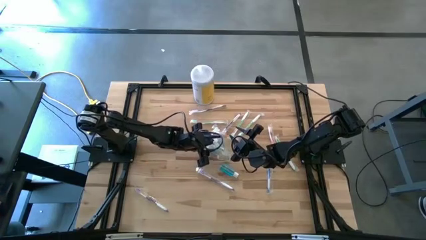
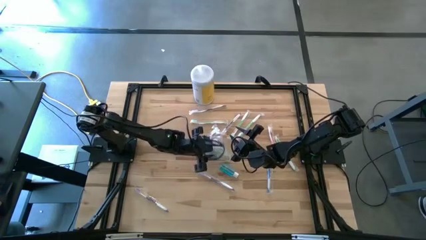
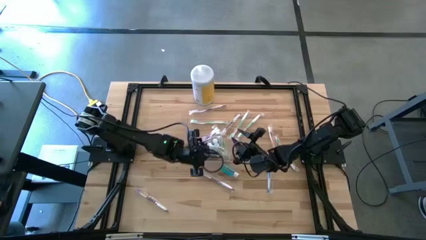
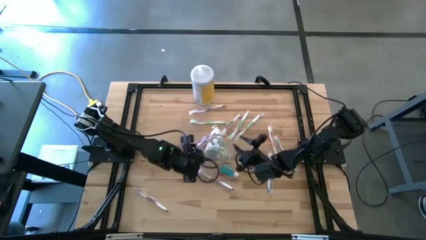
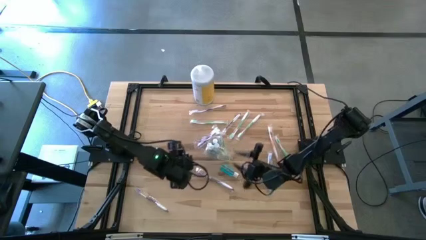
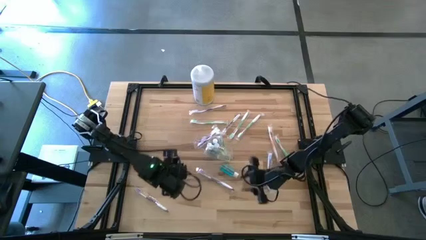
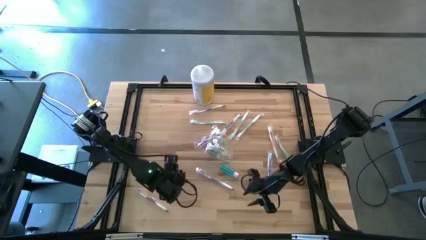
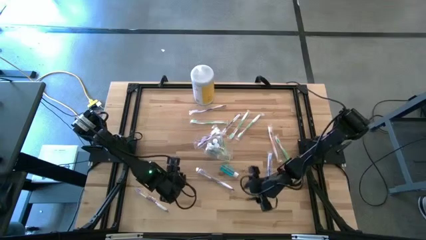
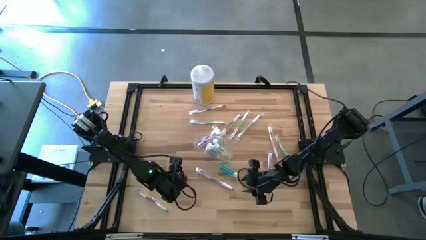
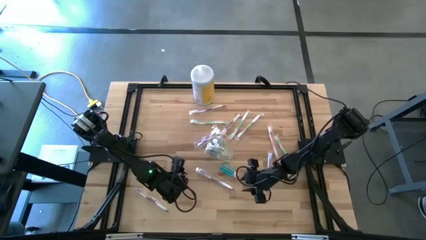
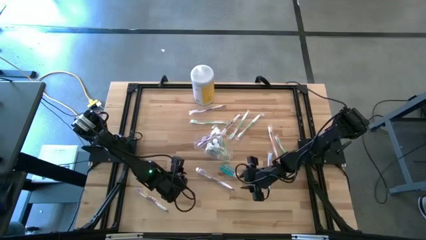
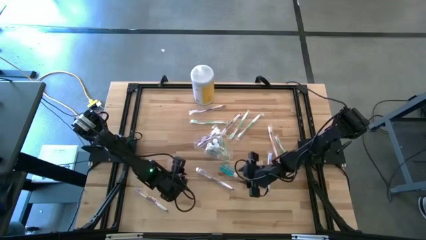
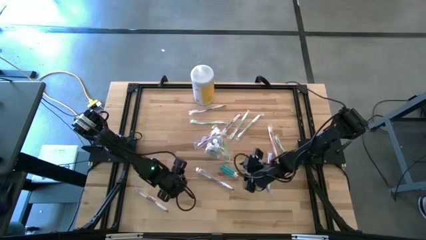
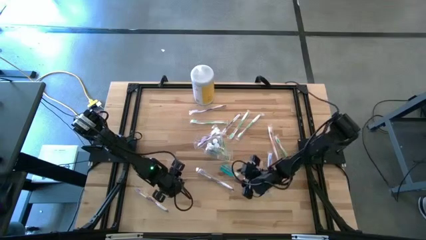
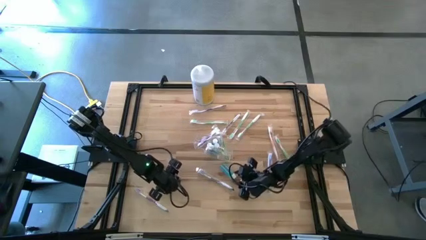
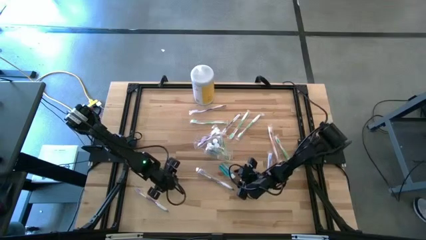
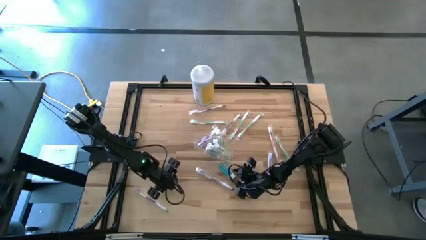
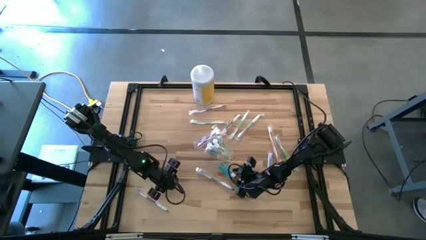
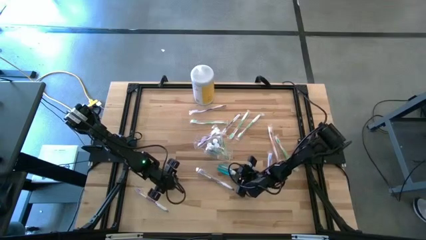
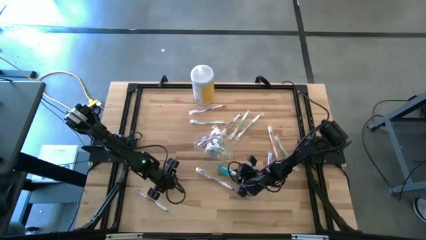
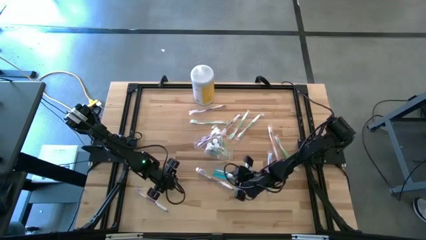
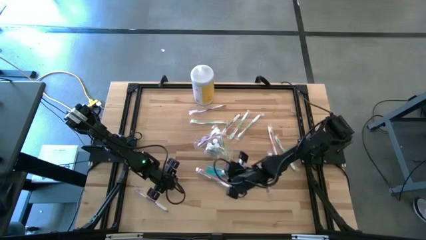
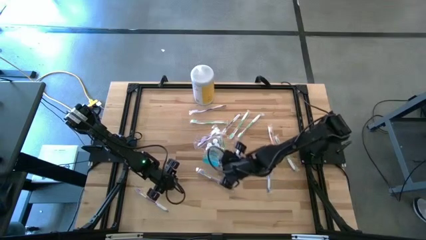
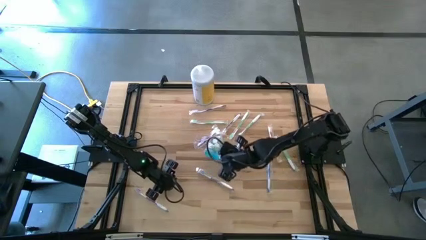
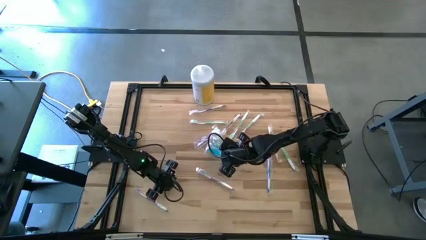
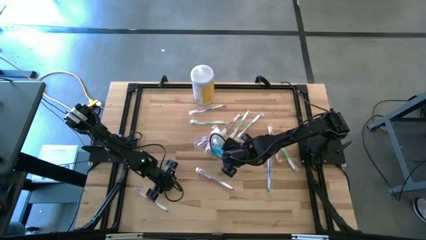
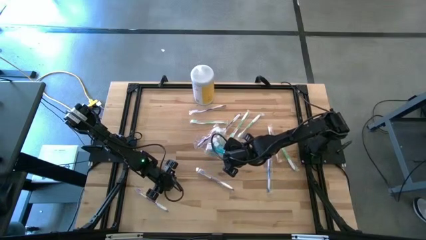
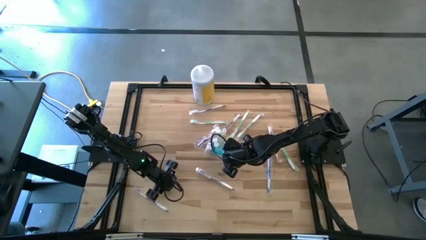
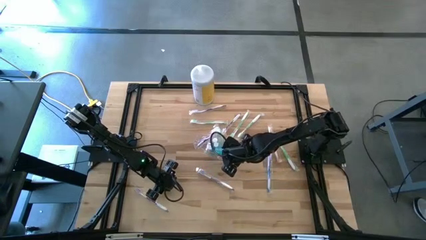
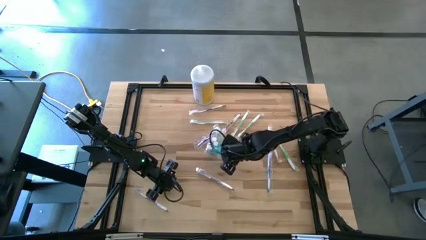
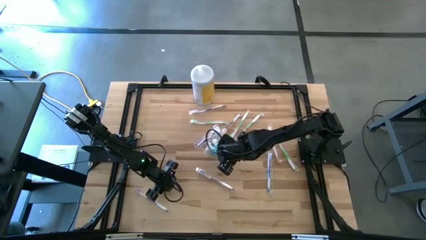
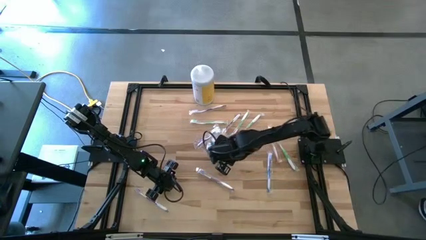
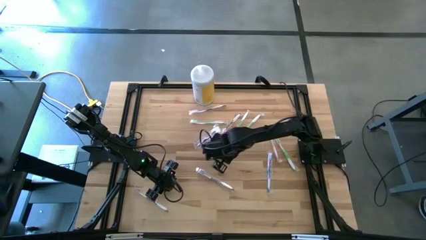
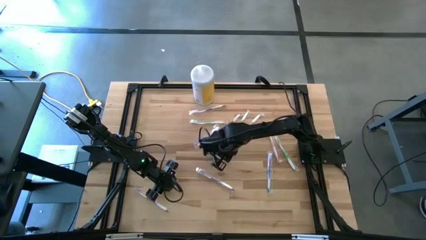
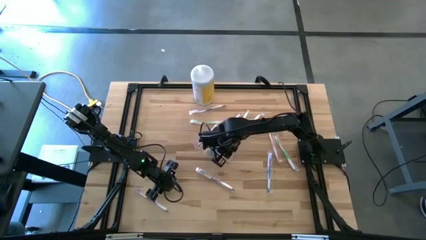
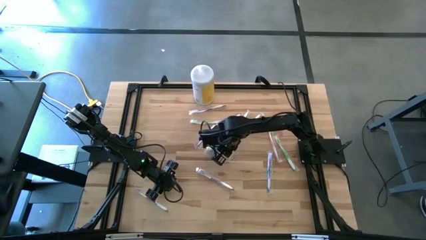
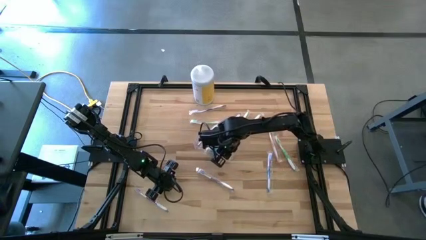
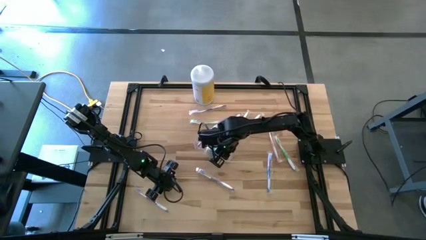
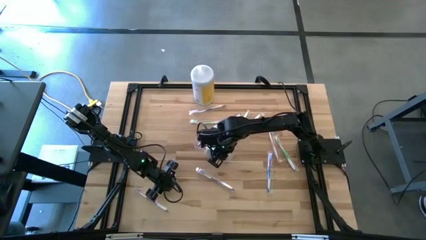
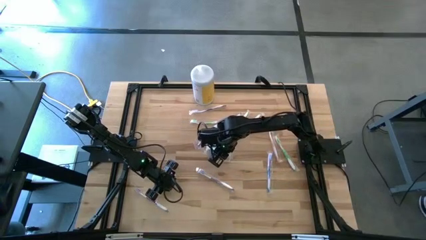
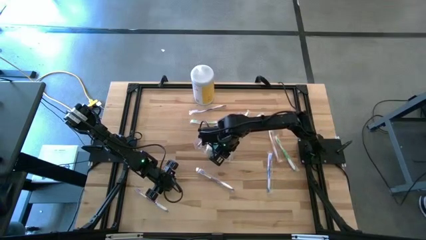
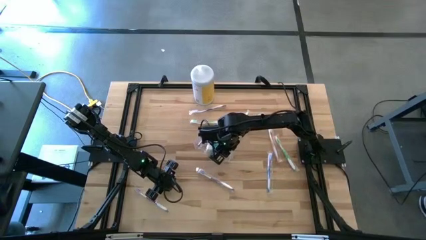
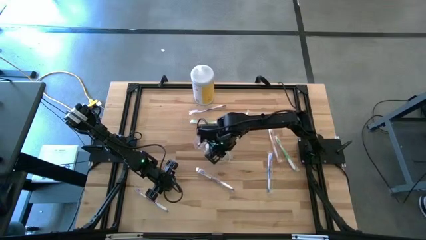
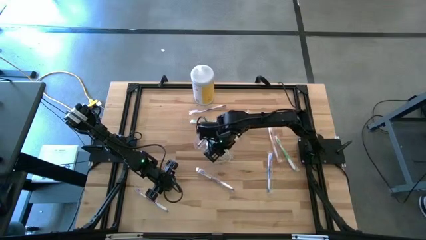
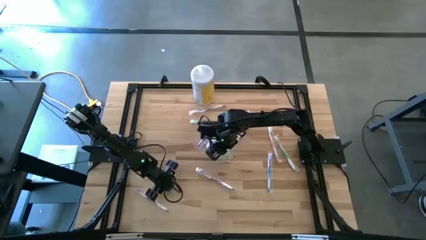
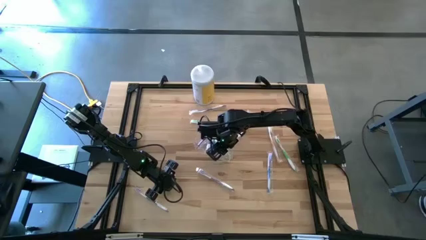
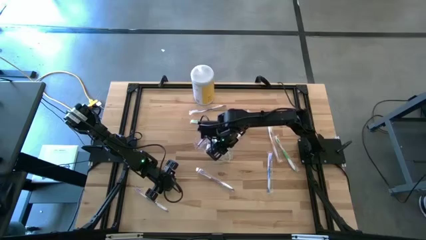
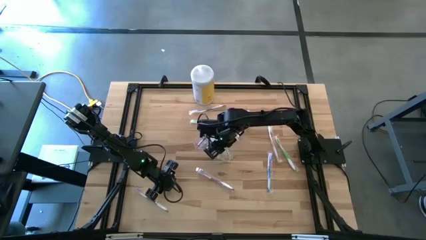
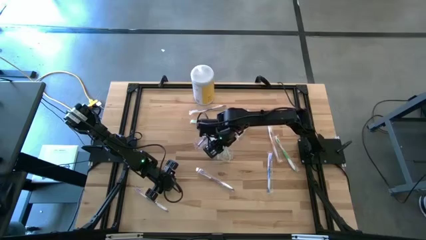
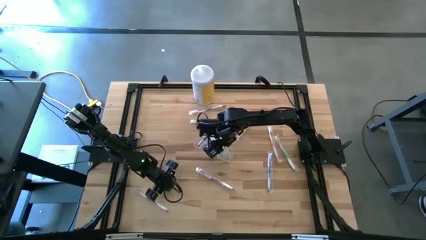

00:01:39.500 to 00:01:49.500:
Task: Pick & Place toothbrushing station
Put the mouthwash bottle into the transparent organizer

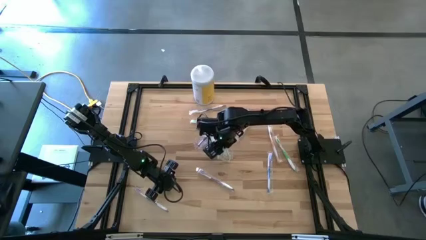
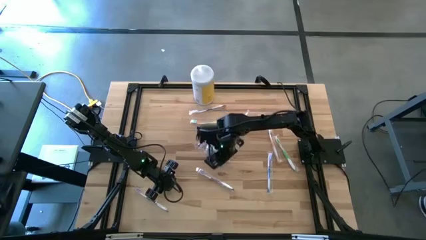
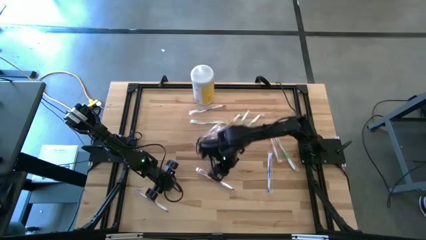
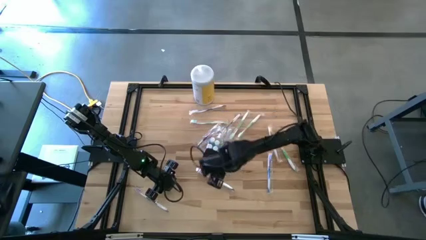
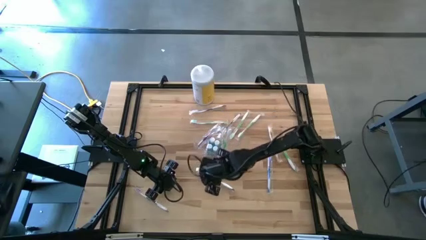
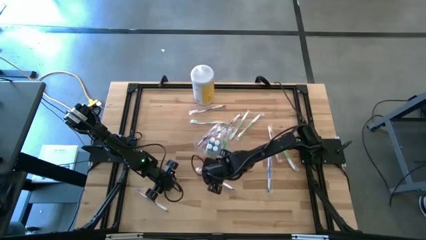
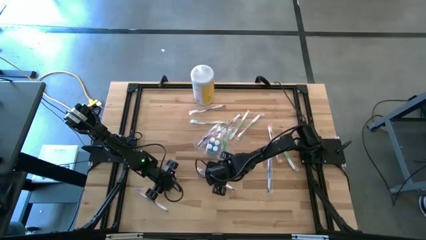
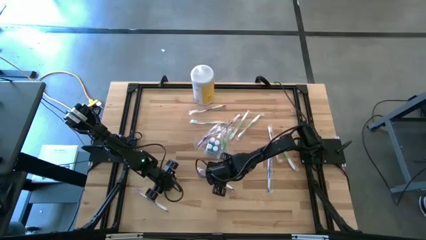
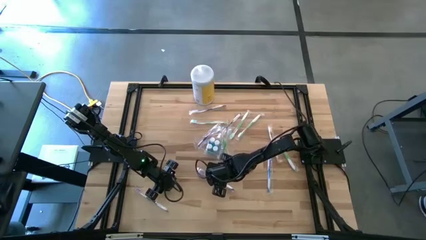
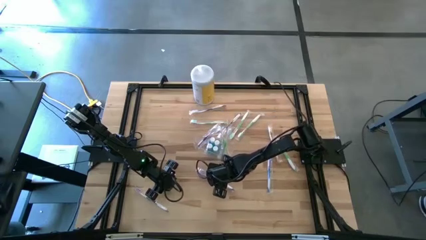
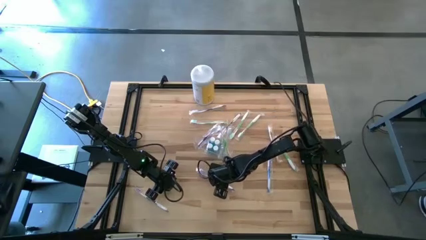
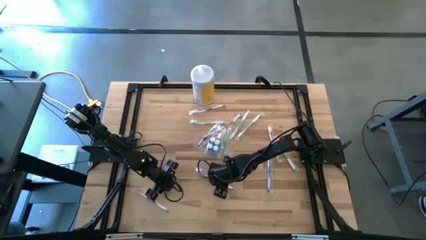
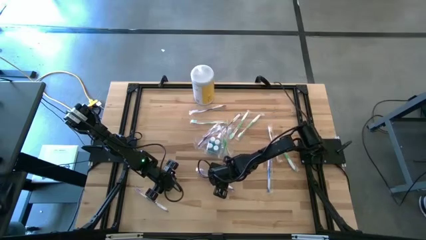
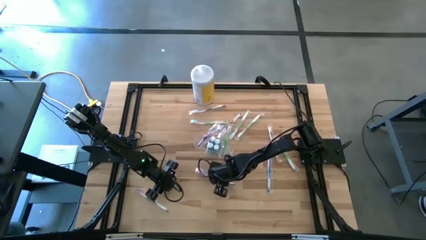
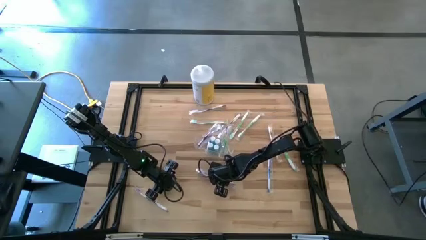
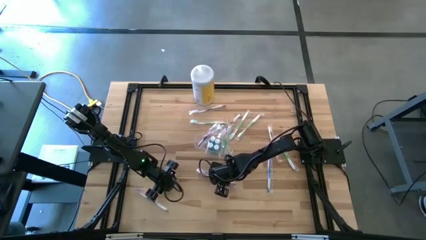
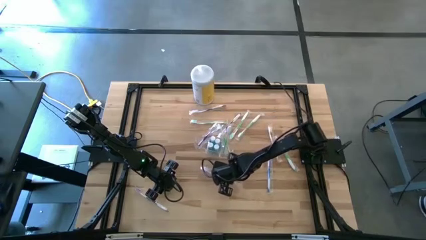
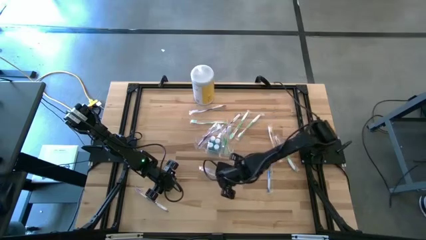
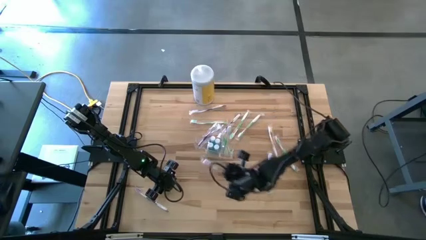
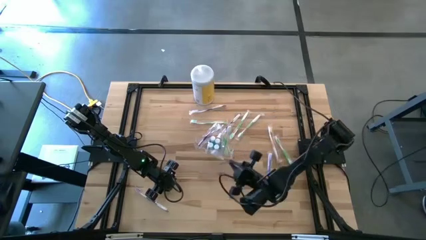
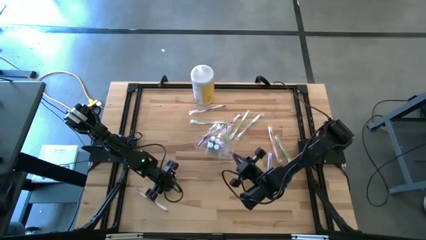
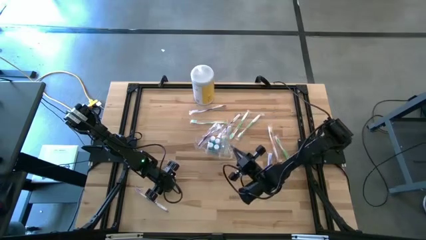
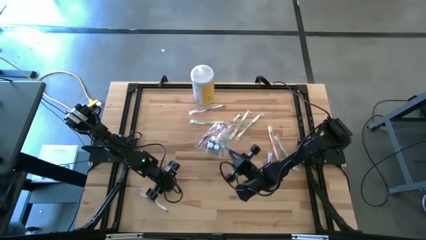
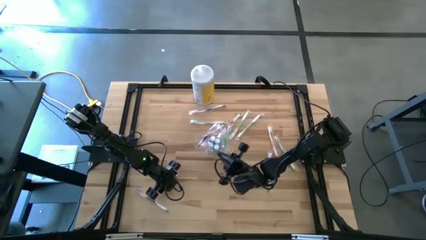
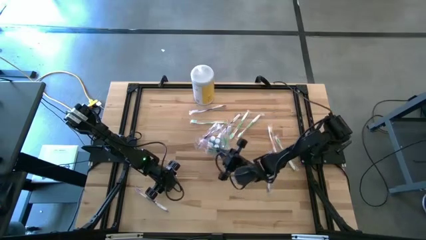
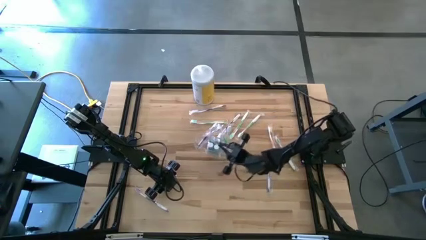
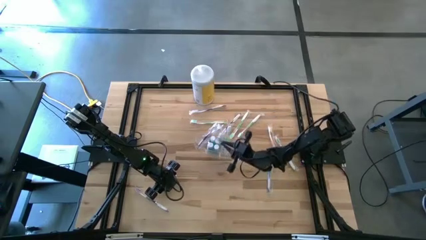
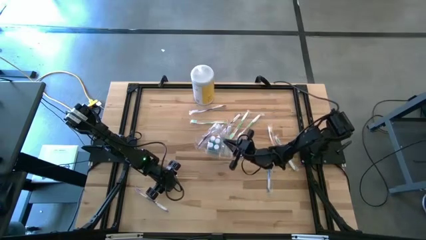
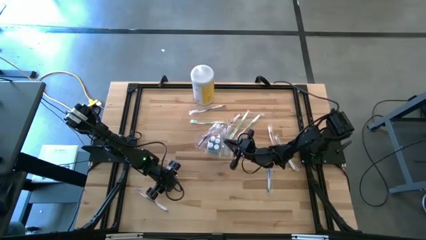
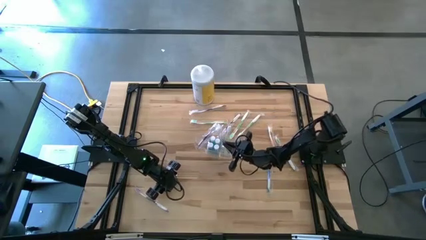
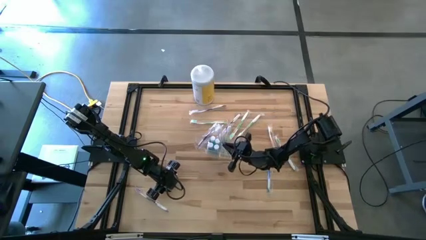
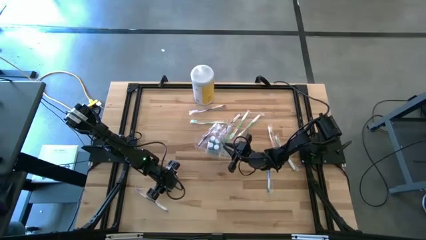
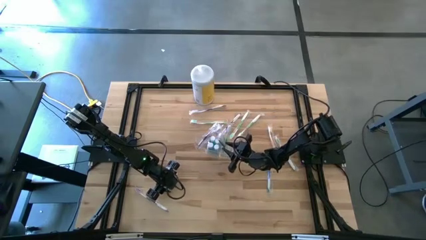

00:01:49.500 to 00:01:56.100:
Put the violet toothbrush into the transparent organizer
